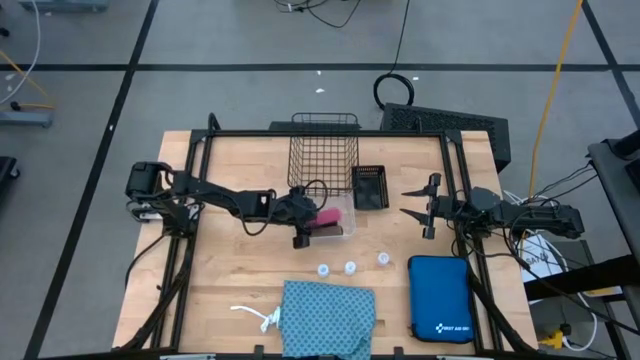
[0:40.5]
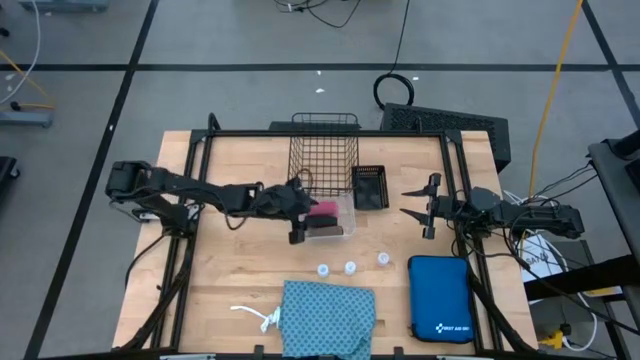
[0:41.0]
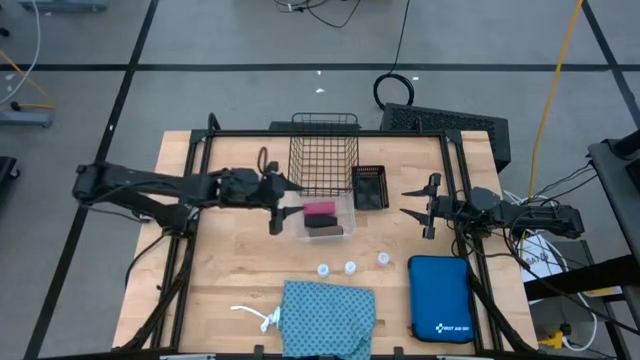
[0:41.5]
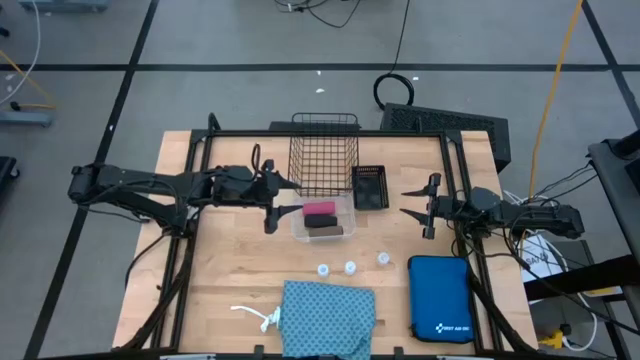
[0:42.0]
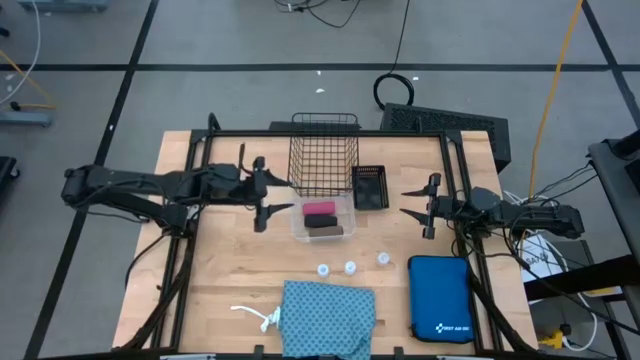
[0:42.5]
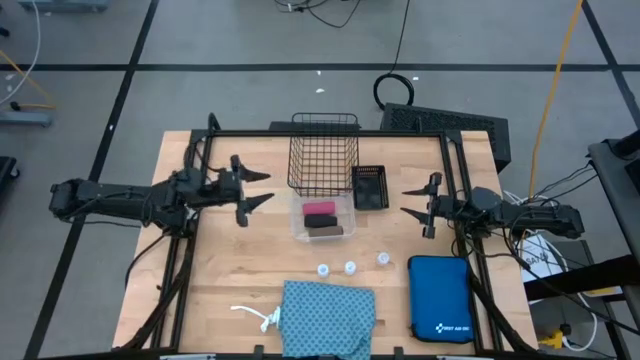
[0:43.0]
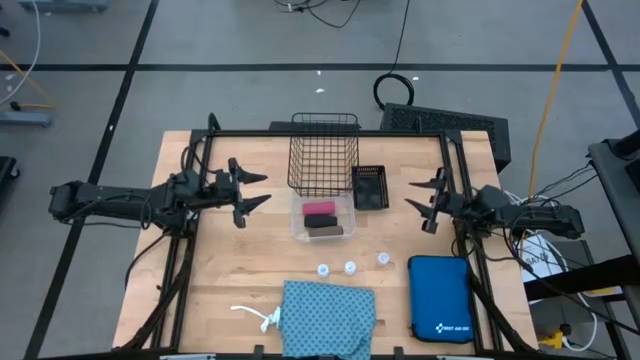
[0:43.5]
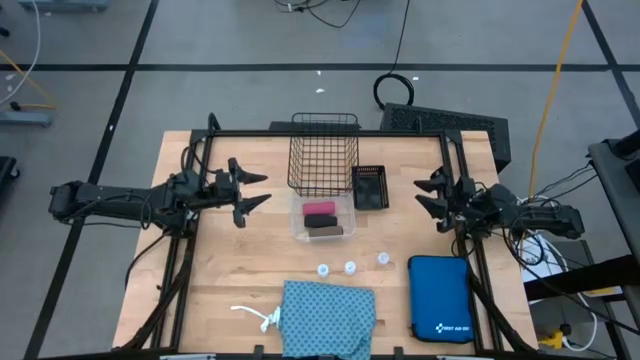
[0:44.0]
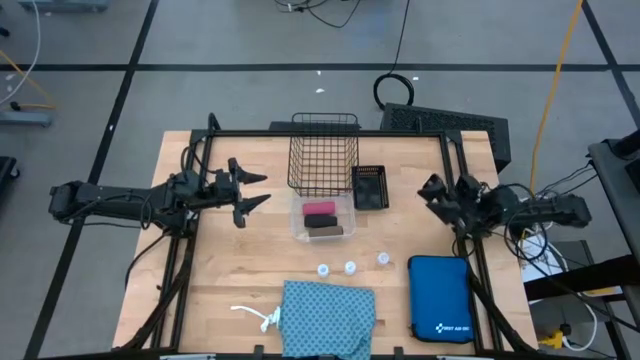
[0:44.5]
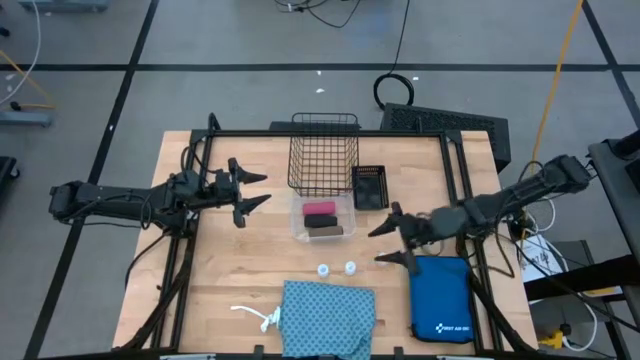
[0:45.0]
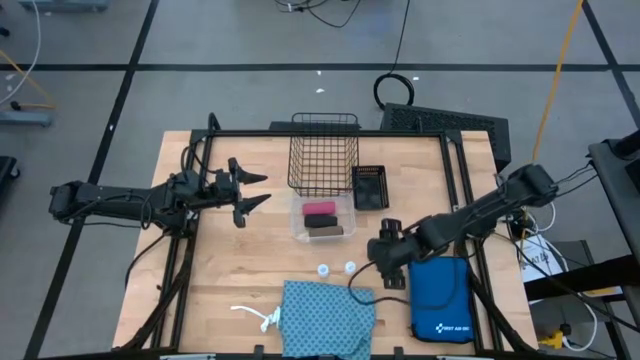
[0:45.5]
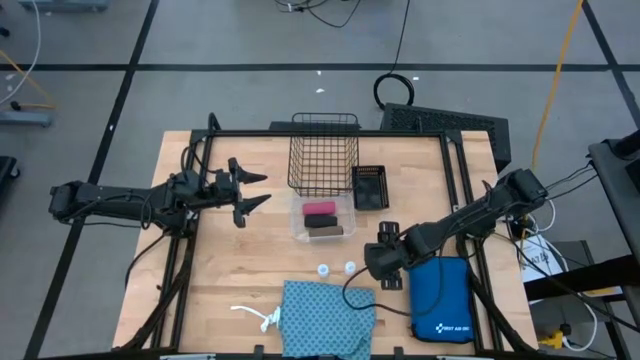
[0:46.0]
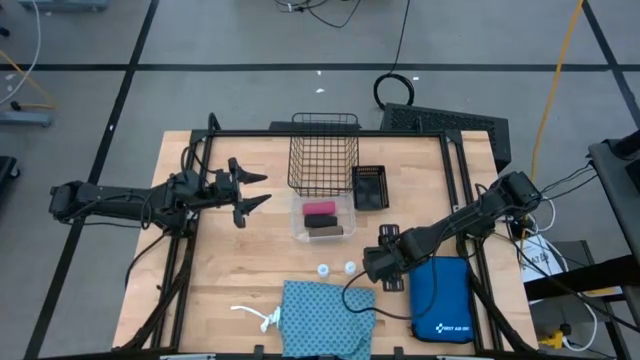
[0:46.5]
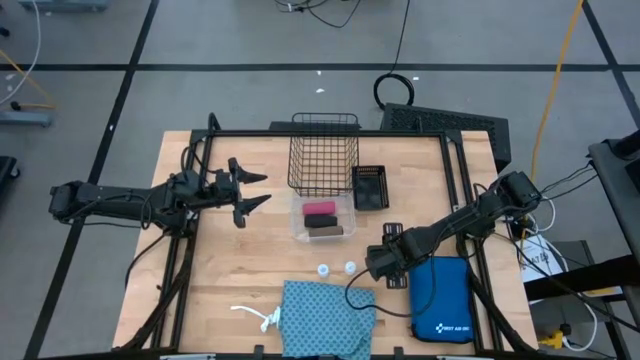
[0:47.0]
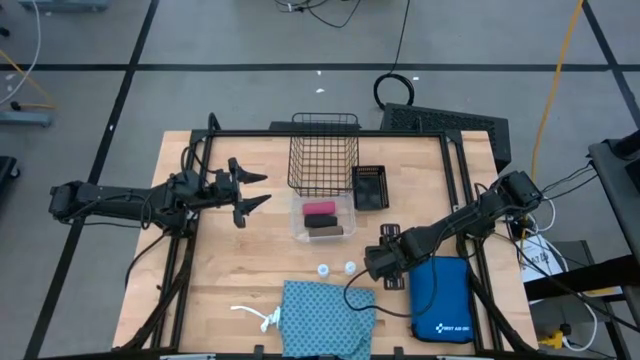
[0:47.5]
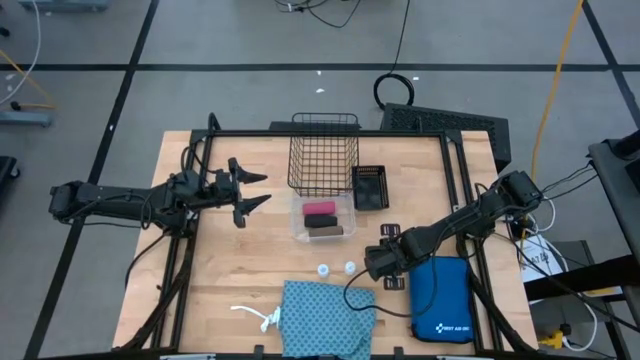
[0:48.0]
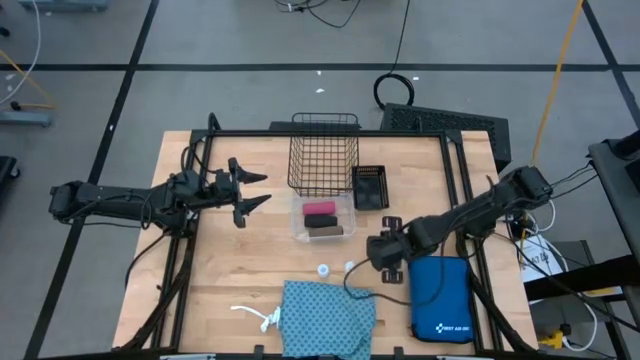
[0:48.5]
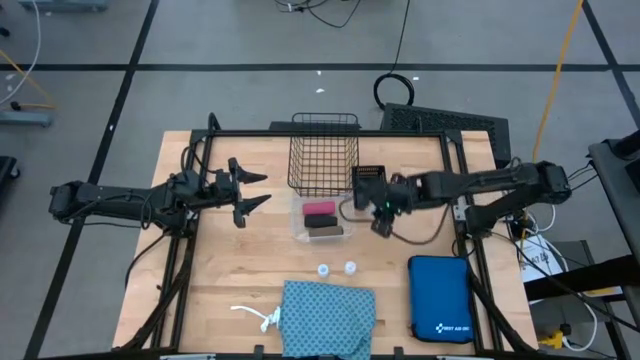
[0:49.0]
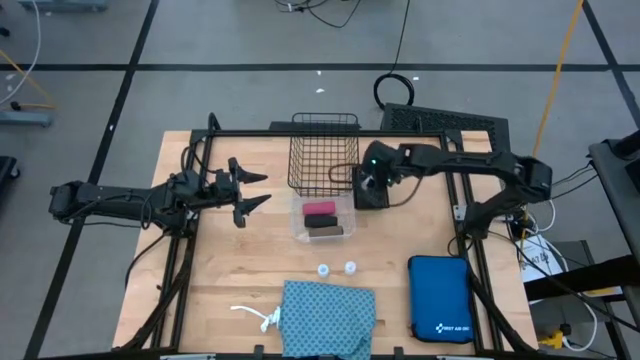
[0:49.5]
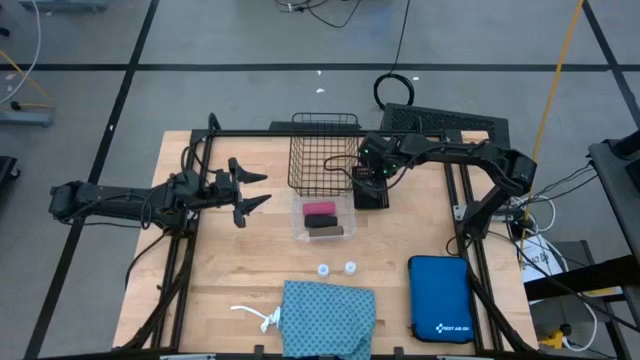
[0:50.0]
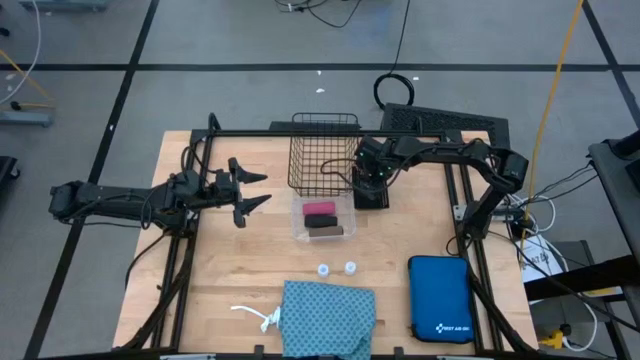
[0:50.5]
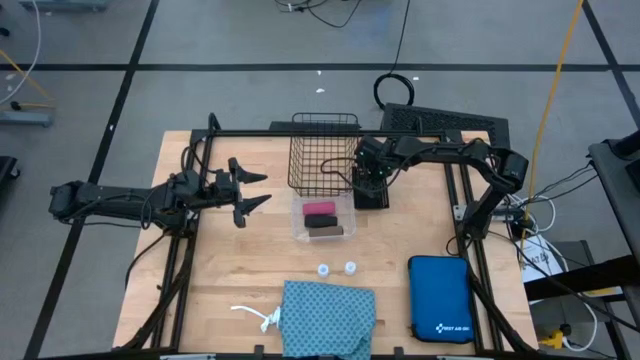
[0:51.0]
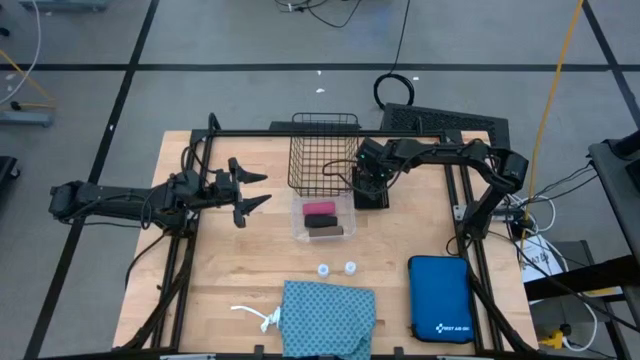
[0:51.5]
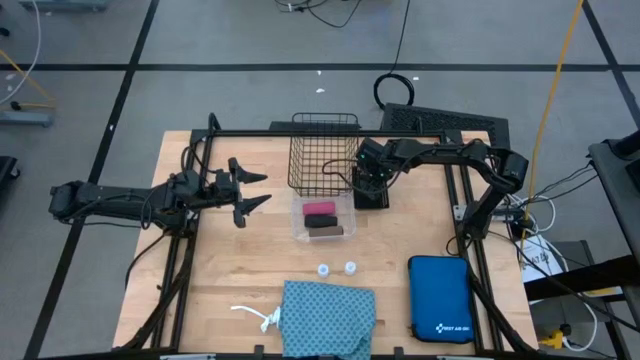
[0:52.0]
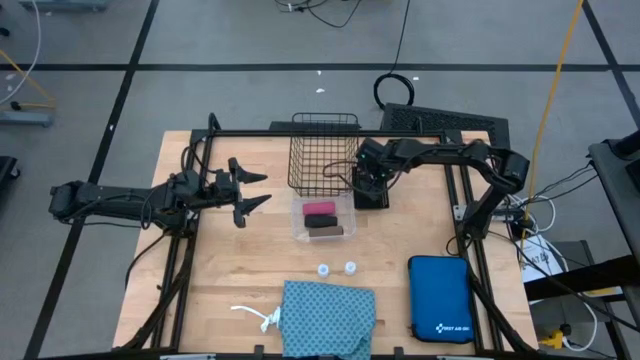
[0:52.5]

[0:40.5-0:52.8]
Task: Pick & Place Medicine items
Put the right transparent medicine bottle into the black bin
